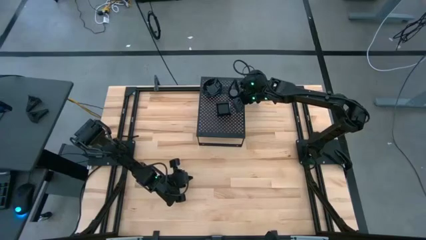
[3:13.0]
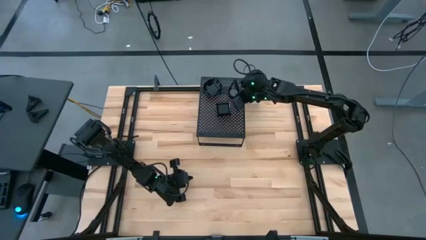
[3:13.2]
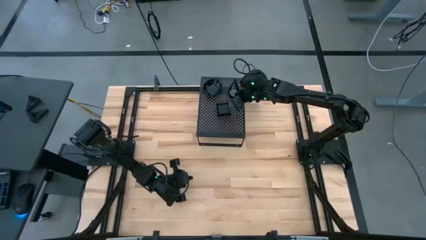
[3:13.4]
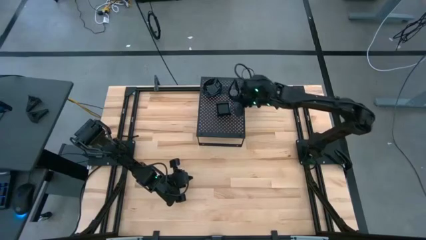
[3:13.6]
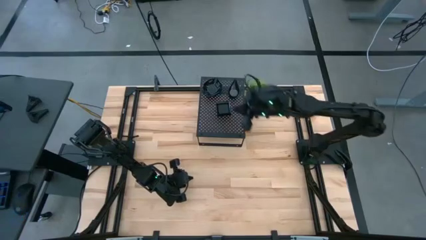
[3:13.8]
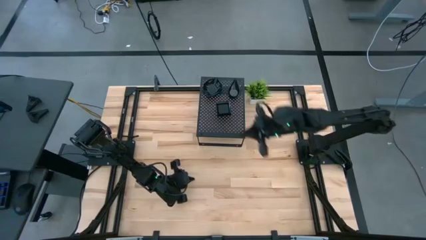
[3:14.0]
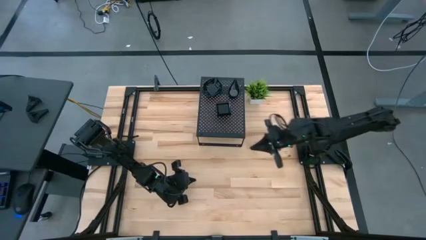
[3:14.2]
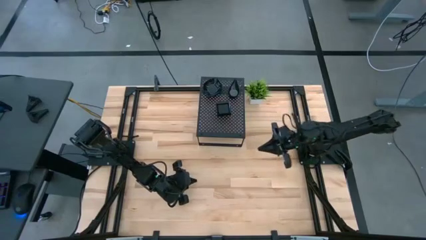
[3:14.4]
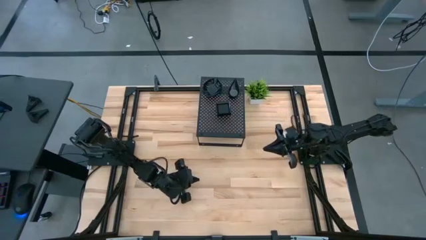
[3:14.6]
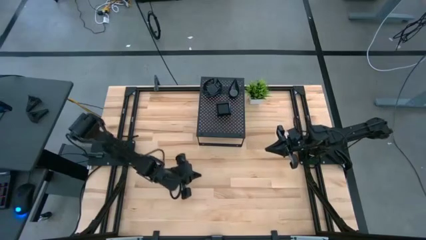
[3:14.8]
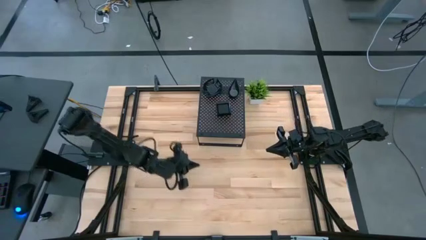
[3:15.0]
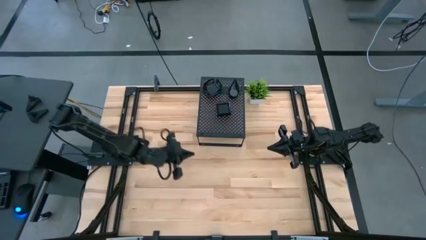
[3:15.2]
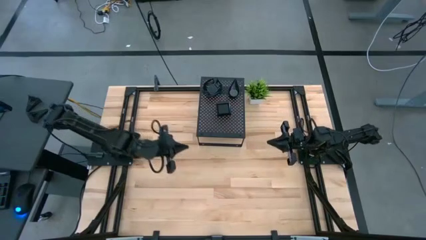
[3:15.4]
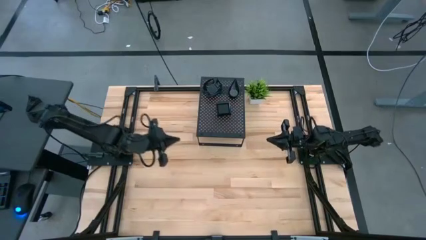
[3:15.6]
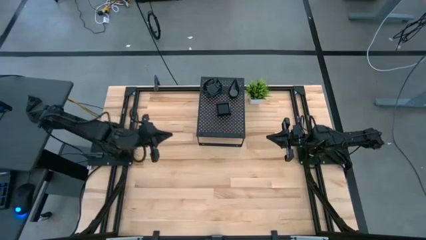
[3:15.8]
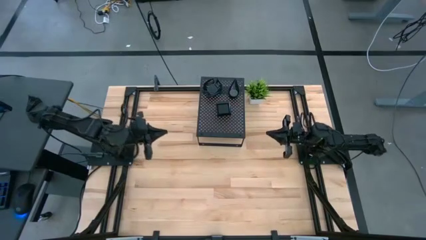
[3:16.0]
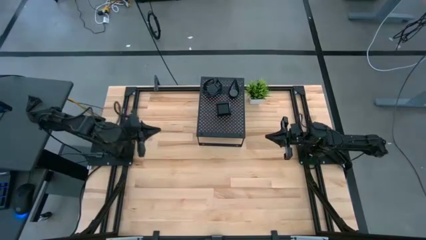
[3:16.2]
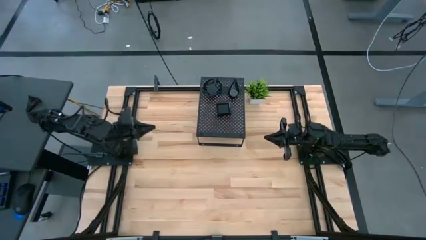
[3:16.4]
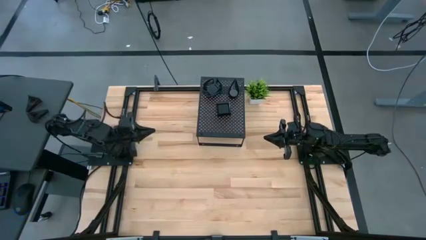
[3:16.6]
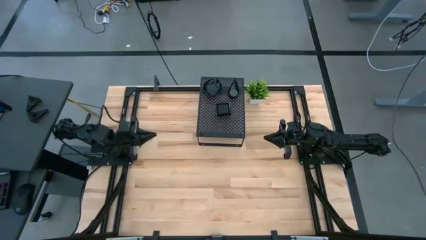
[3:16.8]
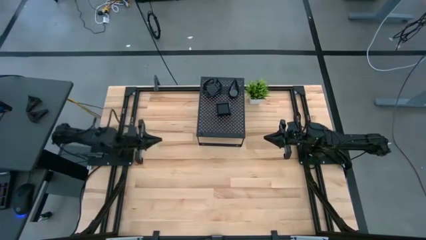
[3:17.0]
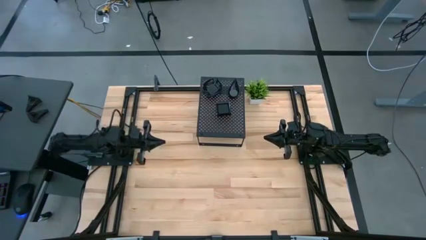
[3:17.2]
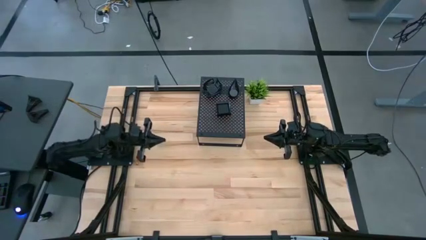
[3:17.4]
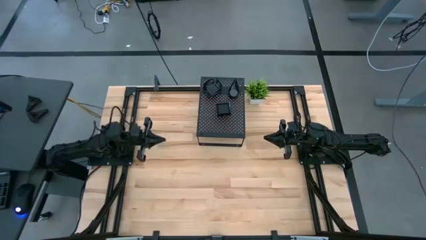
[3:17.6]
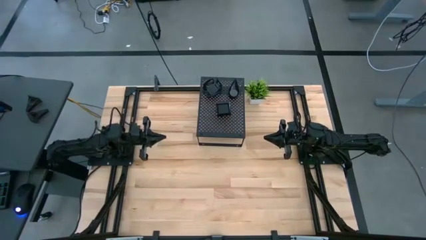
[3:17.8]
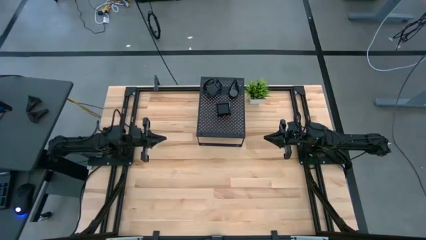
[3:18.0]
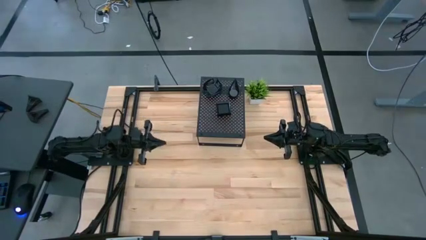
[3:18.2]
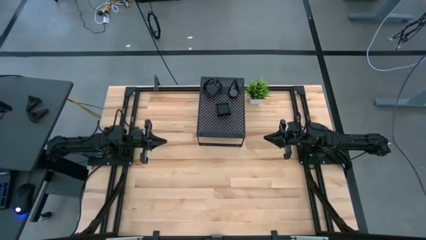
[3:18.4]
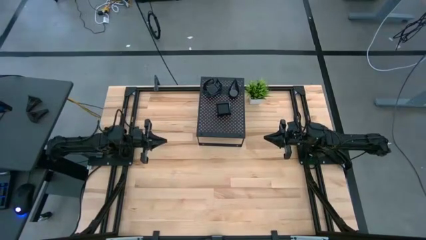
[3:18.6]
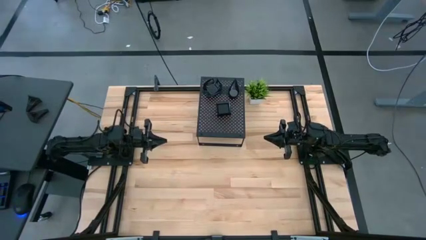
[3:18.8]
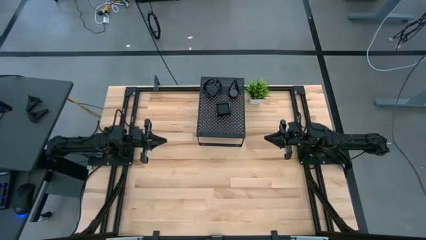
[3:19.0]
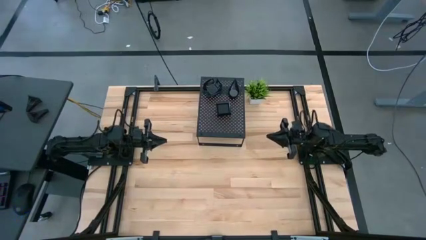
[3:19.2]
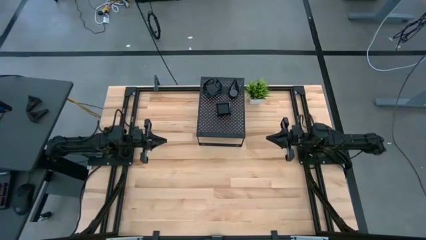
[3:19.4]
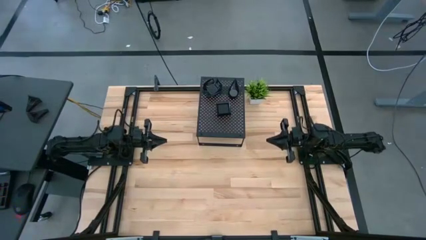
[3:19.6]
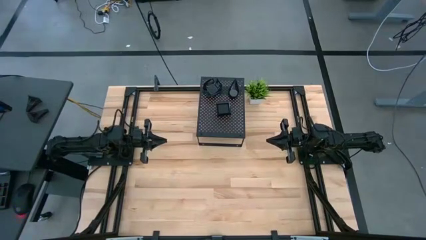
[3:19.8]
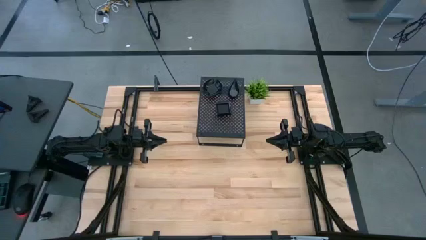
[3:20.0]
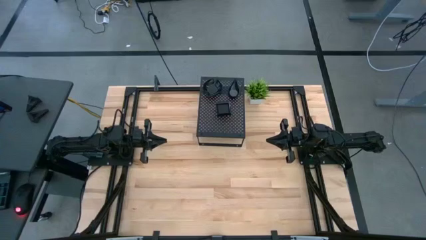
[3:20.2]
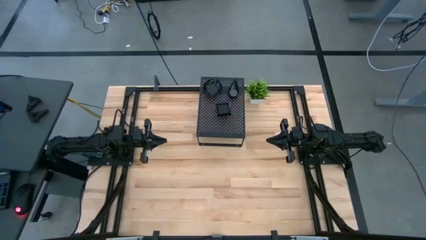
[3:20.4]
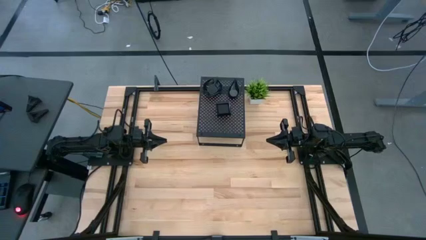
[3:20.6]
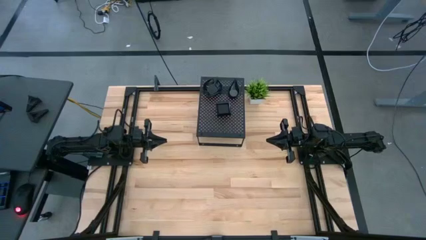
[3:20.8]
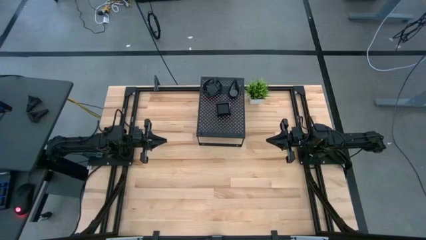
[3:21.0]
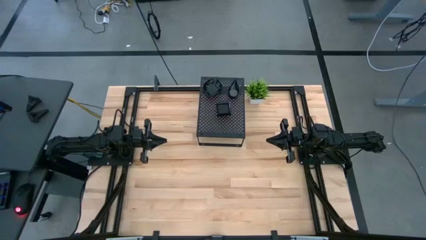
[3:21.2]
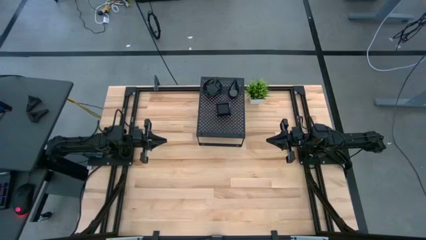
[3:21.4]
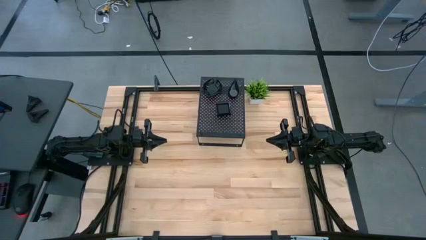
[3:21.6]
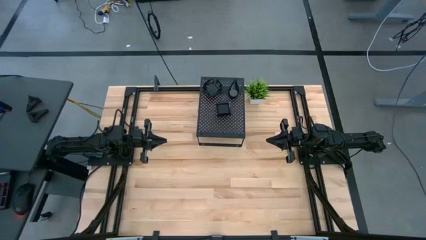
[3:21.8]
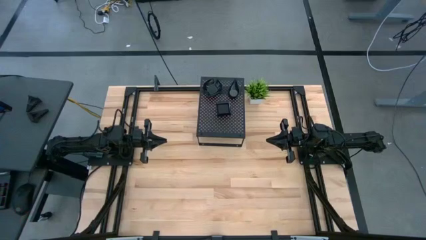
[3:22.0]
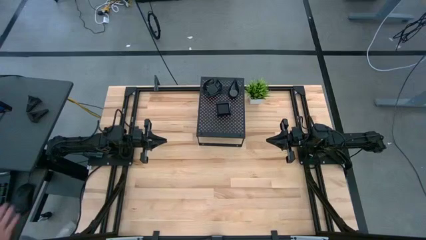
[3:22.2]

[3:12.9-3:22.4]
Task: Pick & Place Mini shaped plates
Return to Home Position

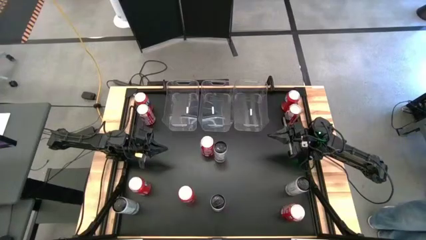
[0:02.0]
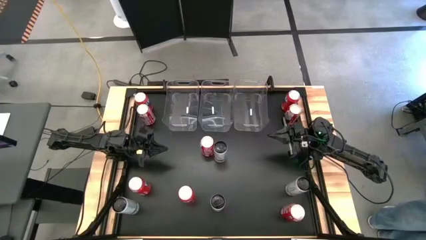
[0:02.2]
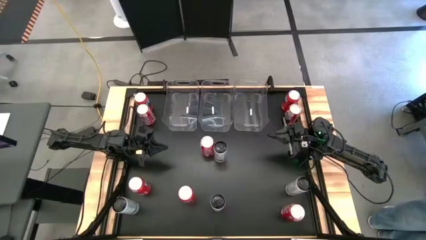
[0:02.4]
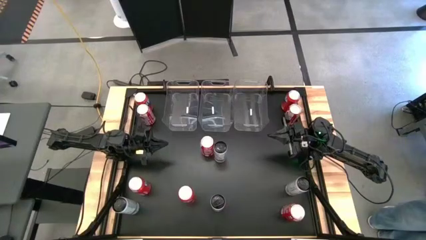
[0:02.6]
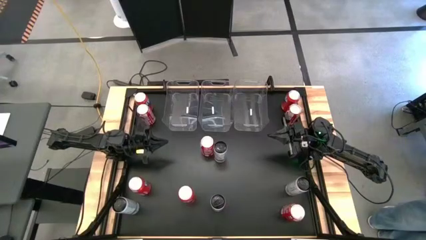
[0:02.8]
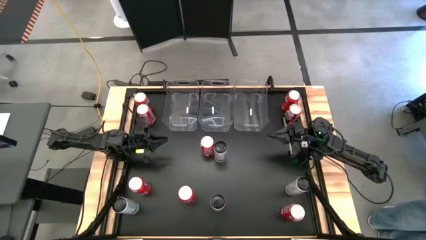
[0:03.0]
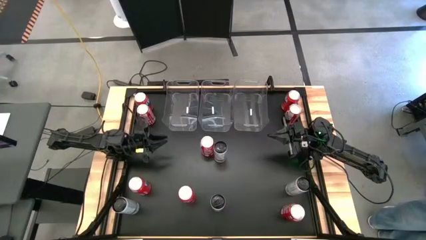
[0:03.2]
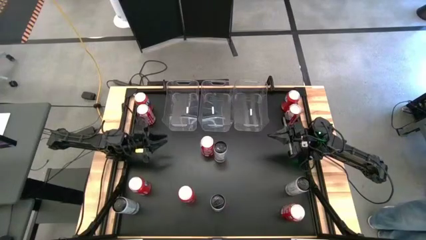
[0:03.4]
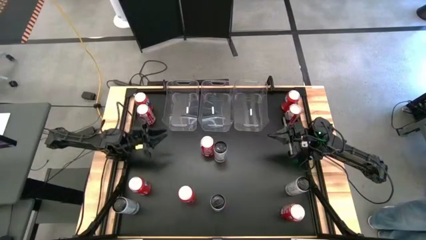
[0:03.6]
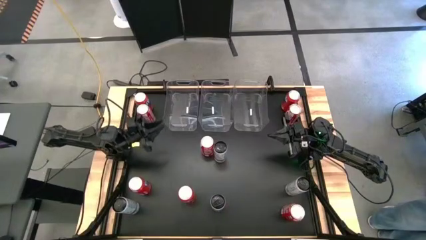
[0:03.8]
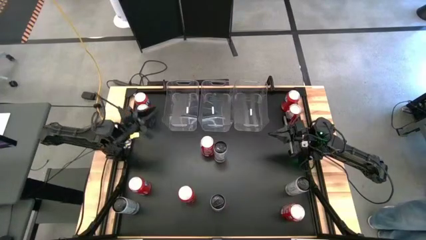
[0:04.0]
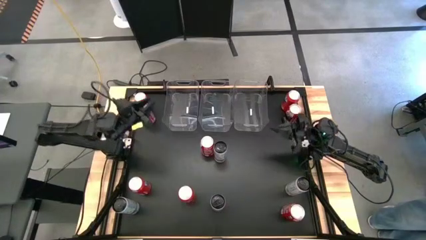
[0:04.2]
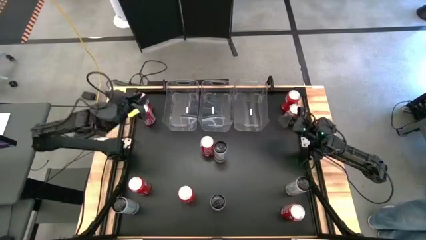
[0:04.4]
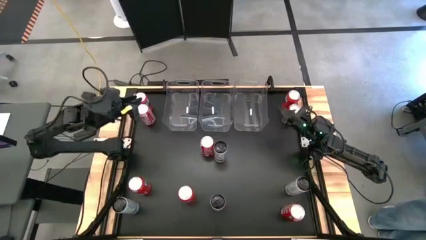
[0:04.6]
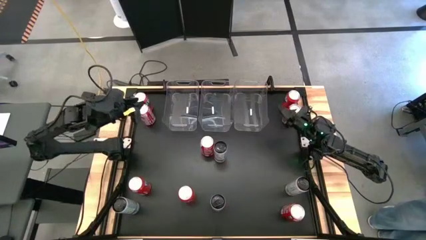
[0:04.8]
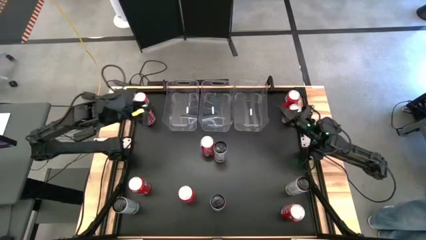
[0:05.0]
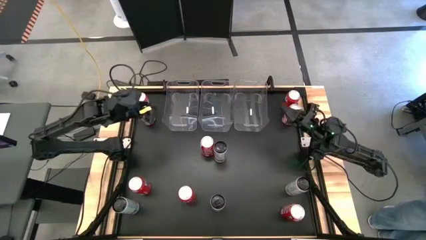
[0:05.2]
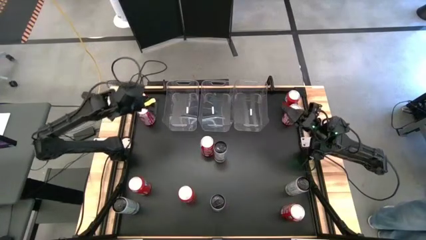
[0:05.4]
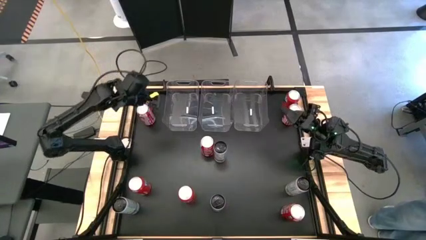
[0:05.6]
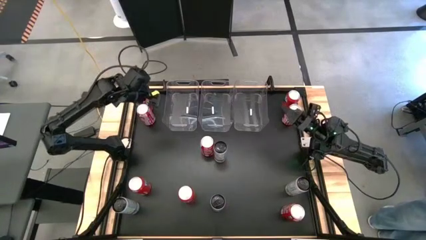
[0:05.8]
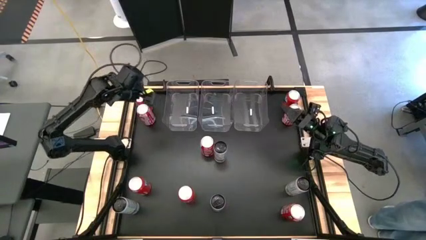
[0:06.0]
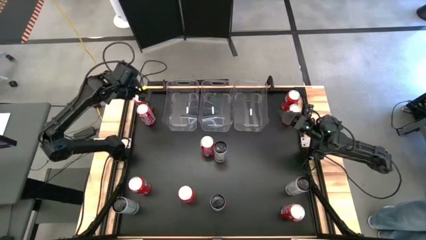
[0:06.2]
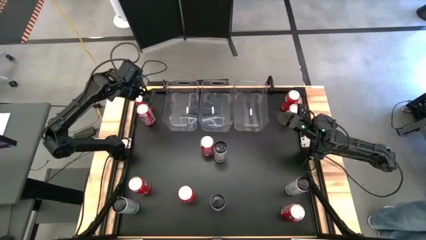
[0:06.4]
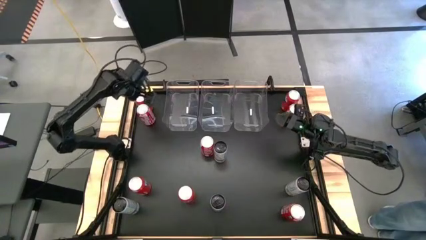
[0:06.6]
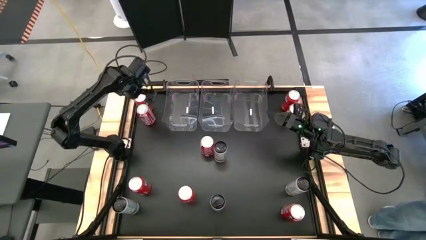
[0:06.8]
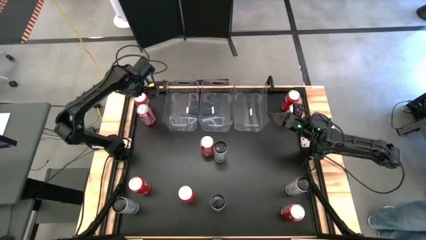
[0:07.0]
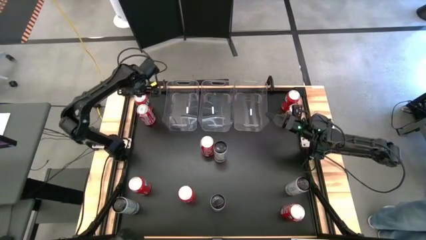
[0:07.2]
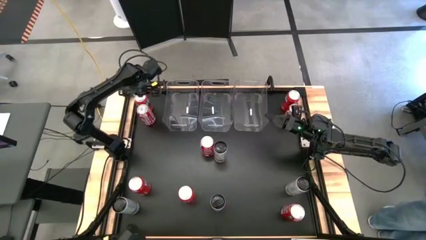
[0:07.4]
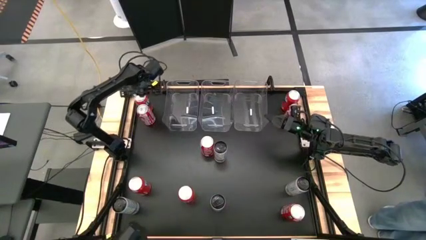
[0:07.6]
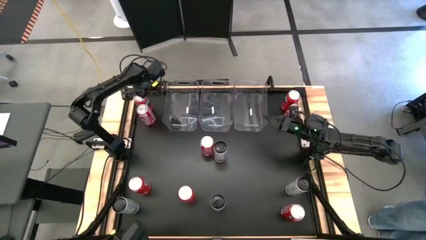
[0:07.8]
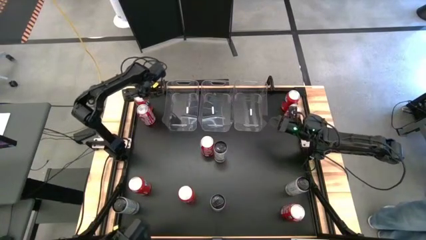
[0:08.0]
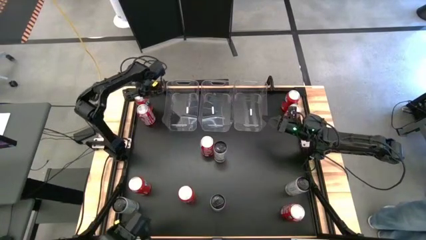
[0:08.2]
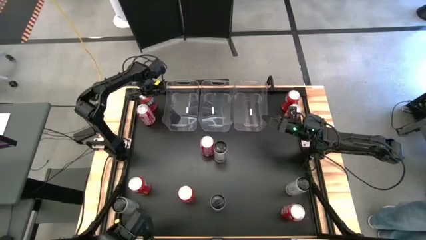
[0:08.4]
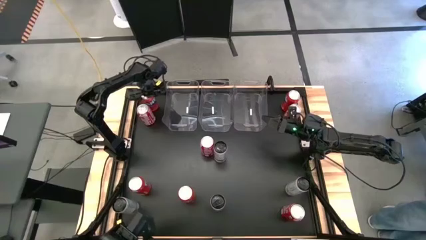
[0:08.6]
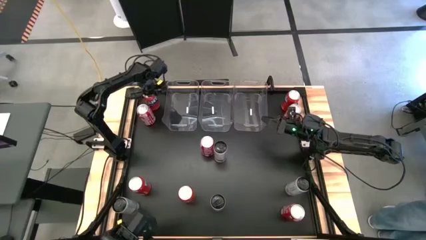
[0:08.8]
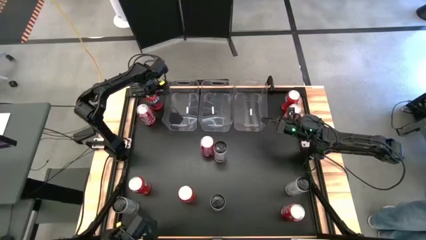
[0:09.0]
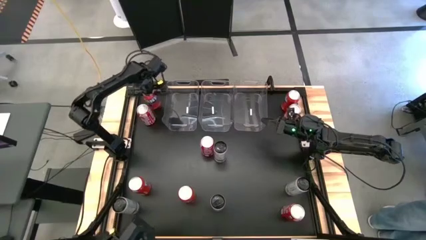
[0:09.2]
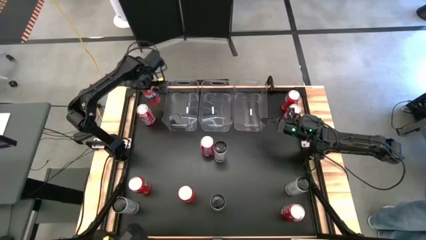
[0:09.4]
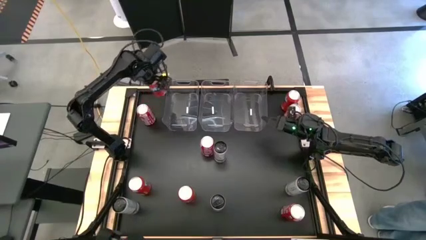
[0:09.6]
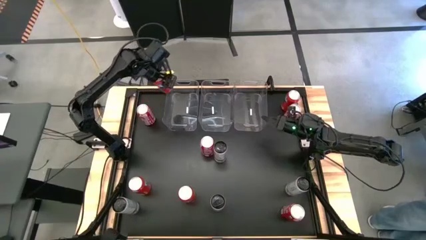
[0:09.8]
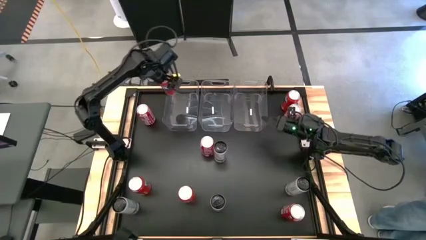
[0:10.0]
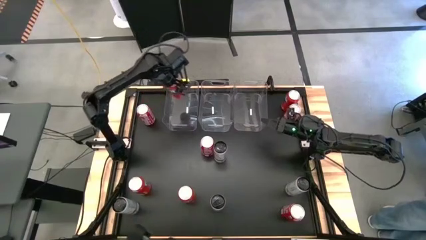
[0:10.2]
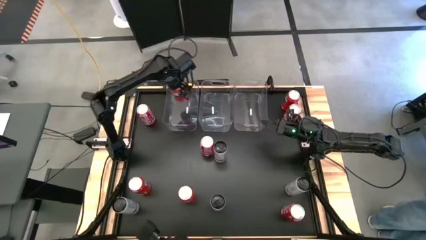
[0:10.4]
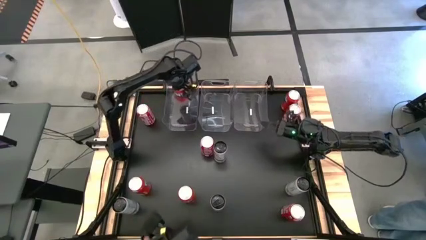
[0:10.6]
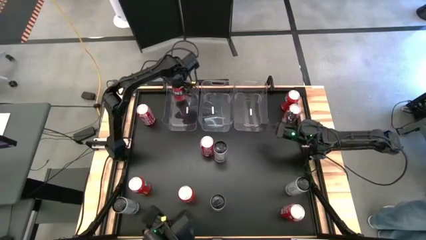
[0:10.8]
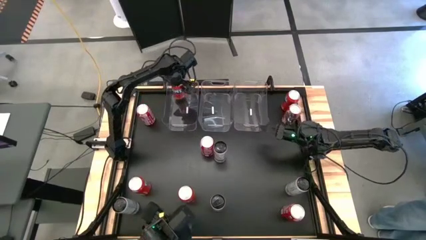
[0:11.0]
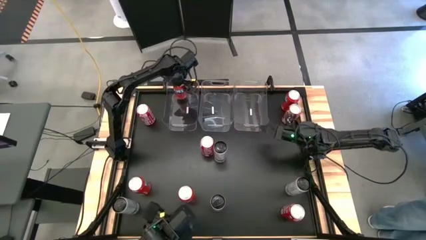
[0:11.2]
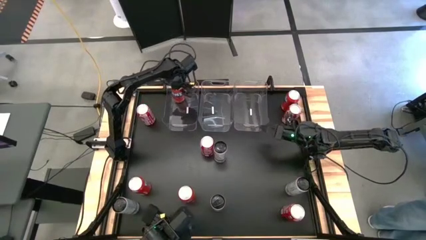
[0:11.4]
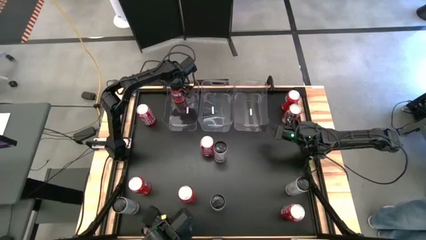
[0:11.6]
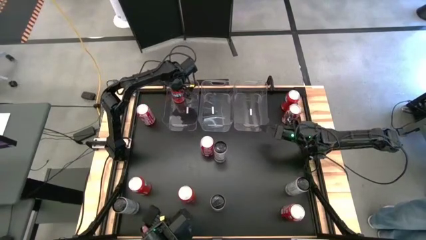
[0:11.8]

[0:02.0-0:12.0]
Task: Sort soda cans
Put the top left red soda can into the left transparent bin
